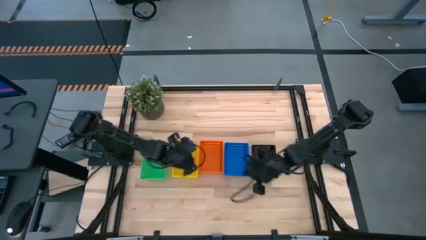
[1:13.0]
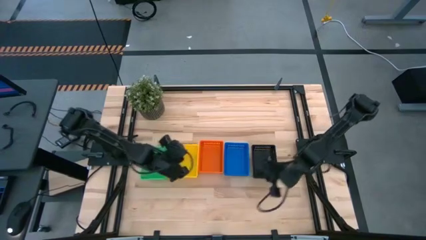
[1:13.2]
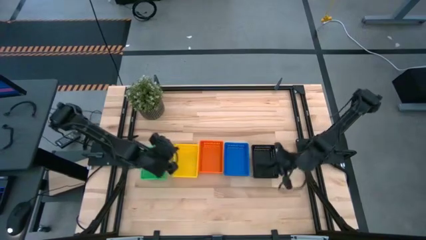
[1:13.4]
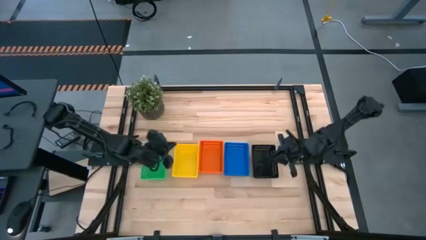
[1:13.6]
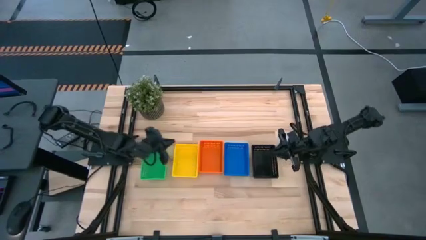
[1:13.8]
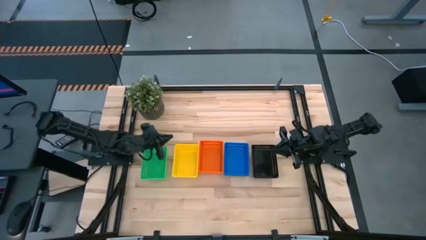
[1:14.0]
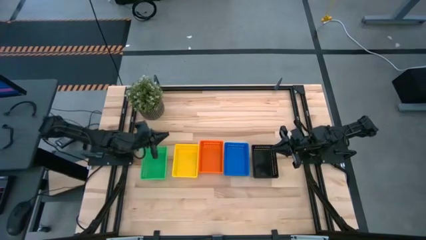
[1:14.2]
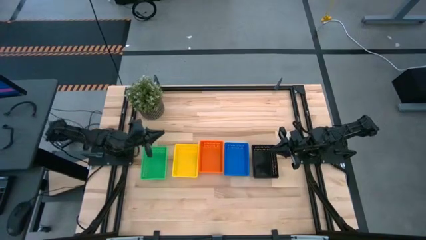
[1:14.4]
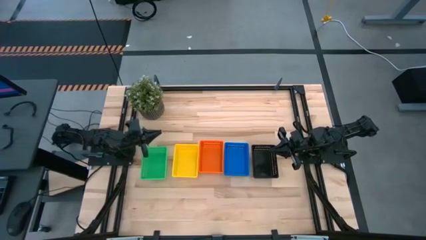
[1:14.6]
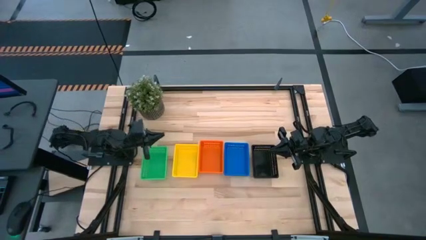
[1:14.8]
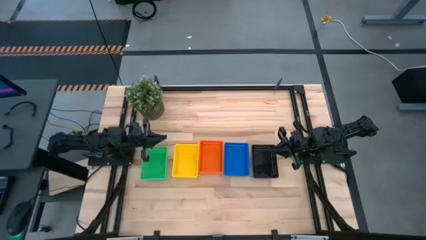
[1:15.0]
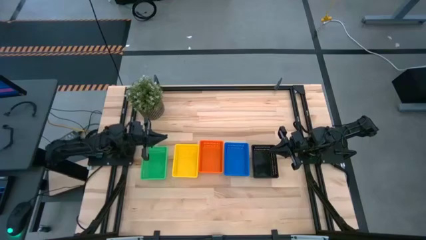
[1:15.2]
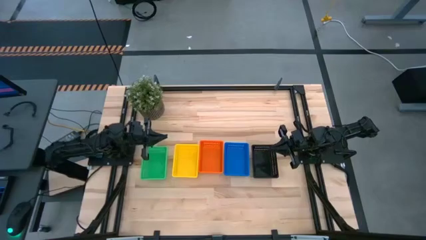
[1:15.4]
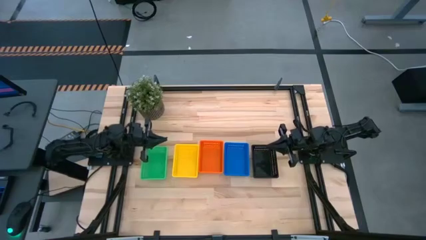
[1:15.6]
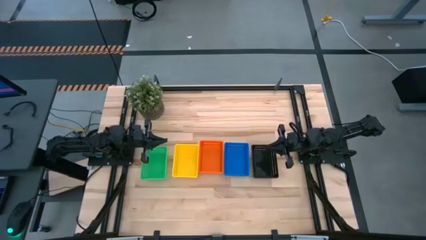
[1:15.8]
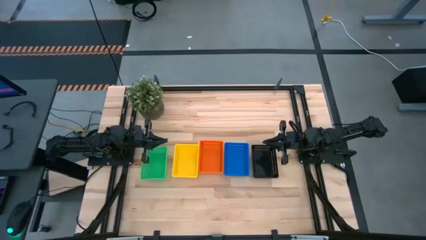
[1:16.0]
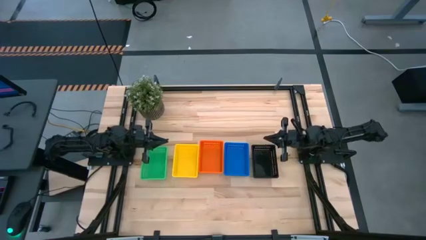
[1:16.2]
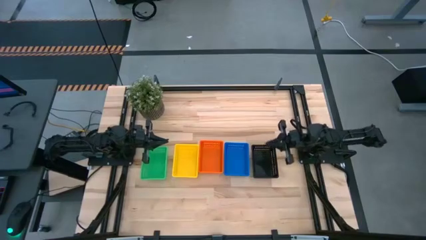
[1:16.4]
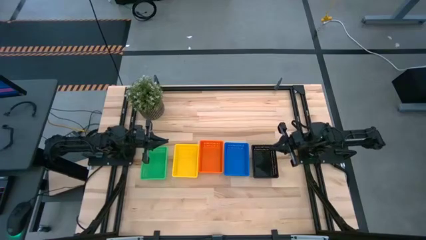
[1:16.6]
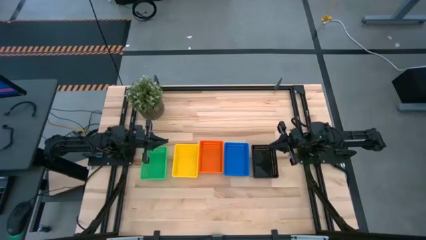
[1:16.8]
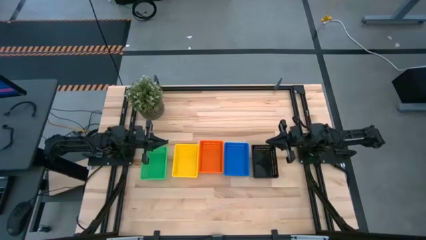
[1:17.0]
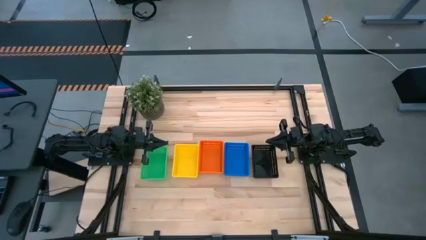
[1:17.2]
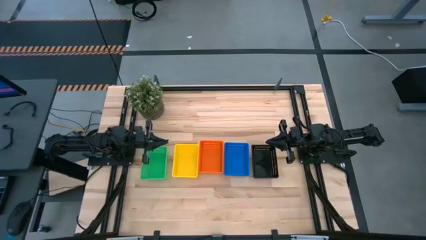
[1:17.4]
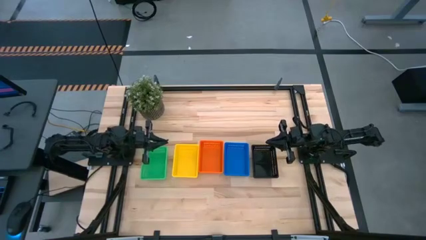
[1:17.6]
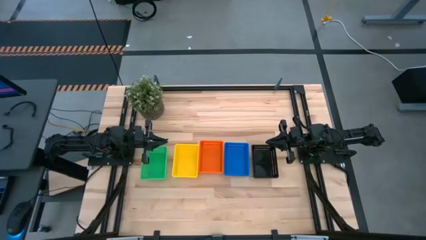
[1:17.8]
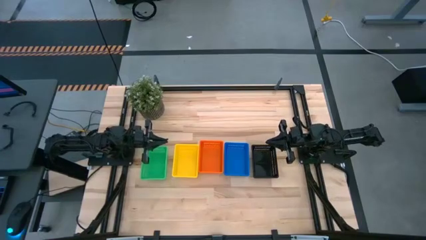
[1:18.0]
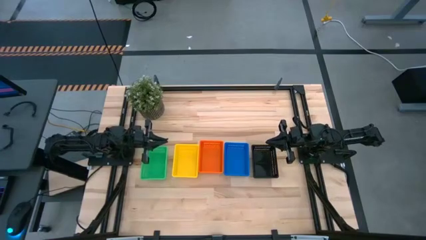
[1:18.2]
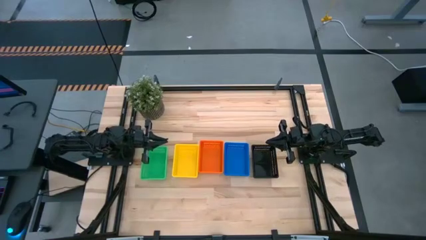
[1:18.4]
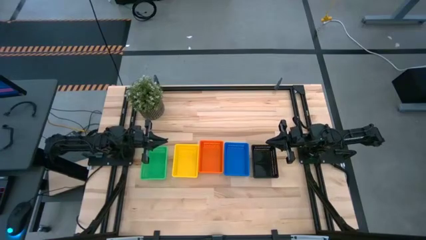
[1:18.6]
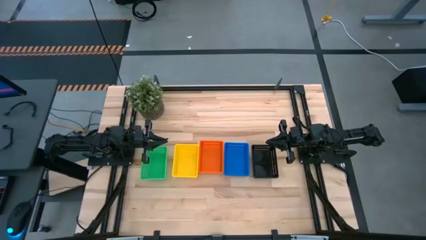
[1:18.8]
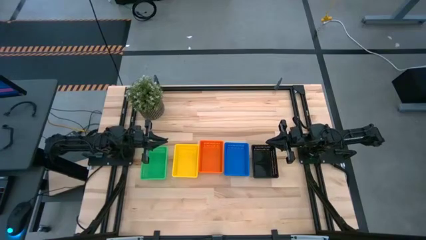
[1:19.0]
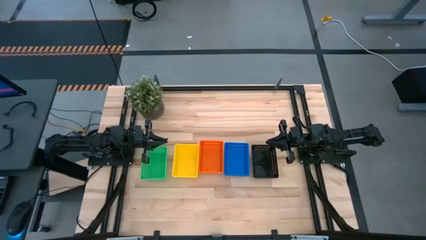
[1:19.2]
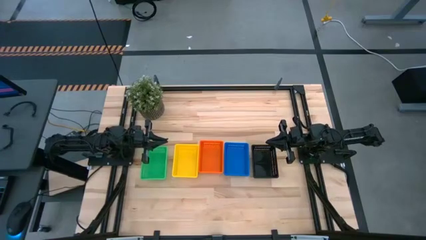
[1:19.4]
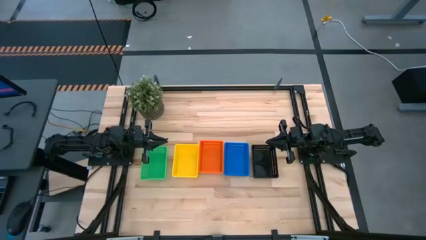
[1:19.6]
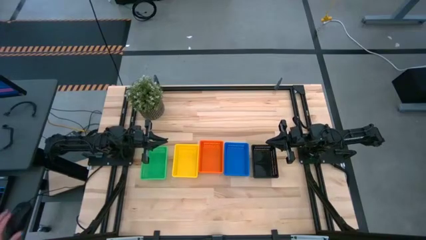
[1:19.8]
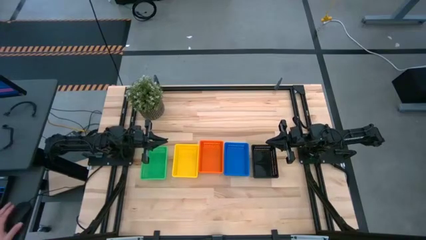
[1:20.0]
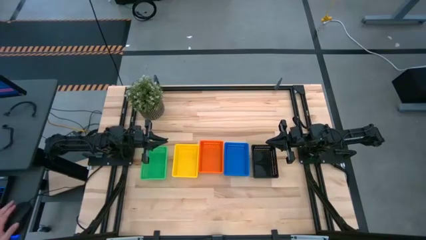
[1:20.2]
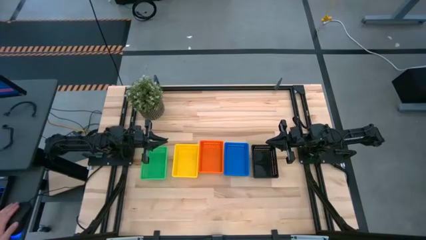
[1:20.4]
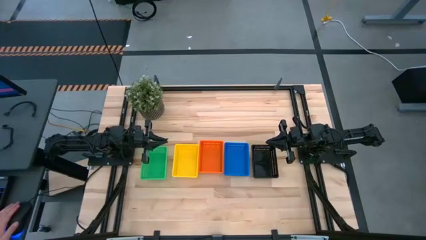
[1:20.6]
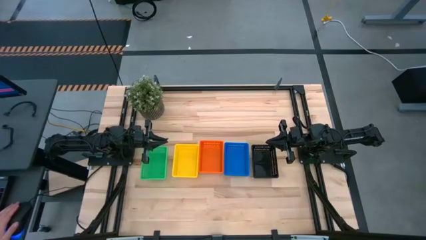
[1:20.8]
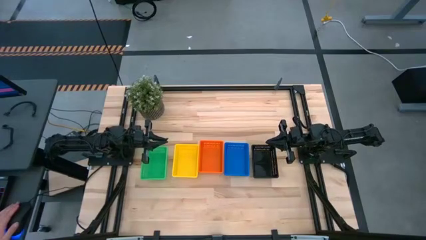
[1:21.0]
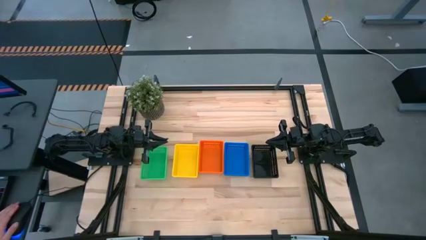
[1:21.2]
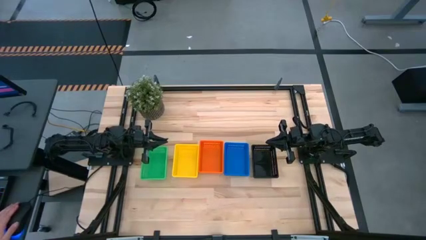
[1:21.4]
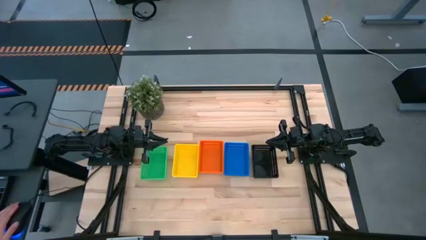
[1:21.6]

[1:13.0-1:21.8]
Return to Home Position

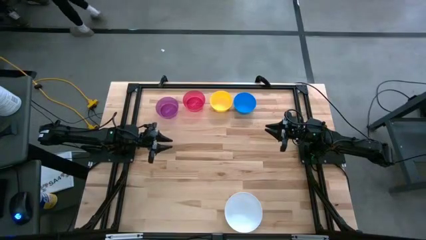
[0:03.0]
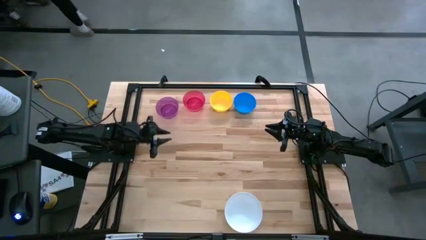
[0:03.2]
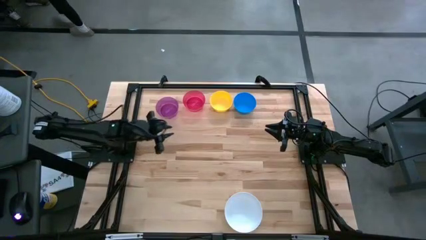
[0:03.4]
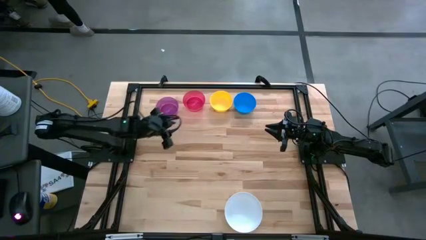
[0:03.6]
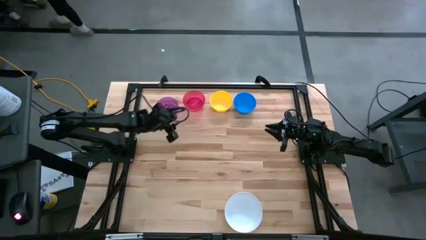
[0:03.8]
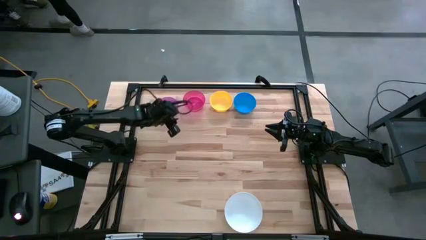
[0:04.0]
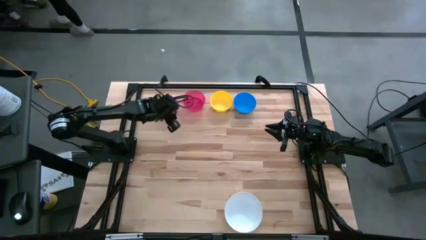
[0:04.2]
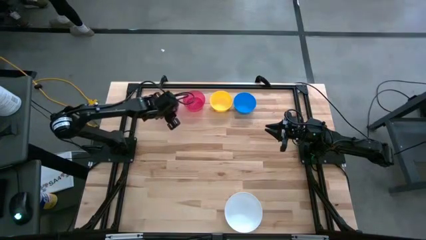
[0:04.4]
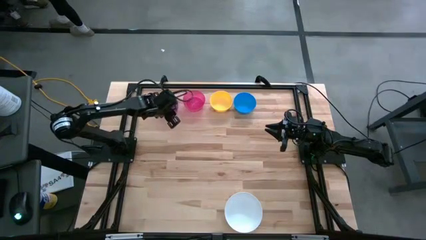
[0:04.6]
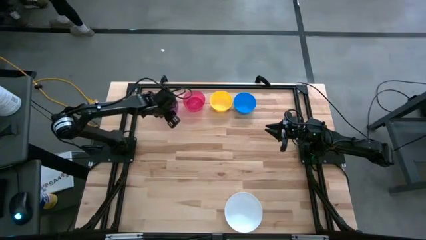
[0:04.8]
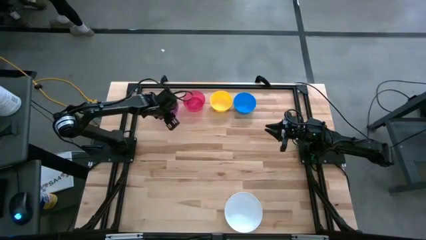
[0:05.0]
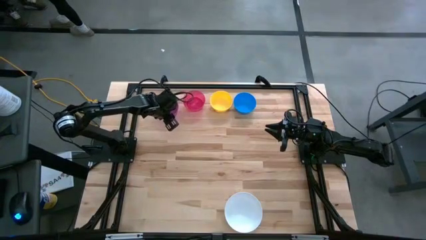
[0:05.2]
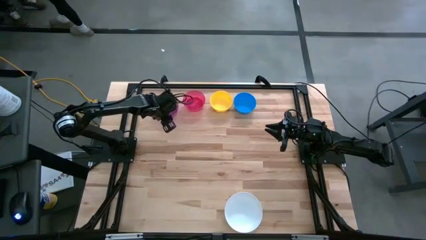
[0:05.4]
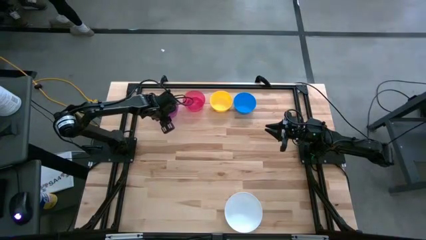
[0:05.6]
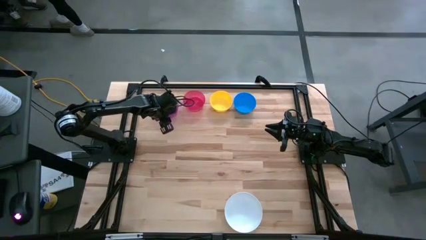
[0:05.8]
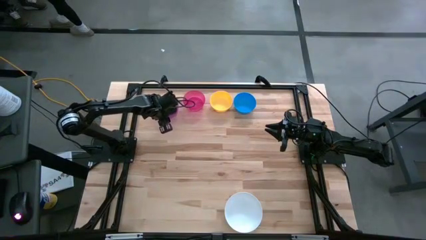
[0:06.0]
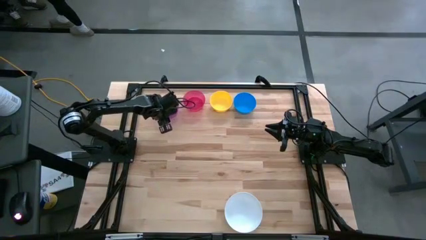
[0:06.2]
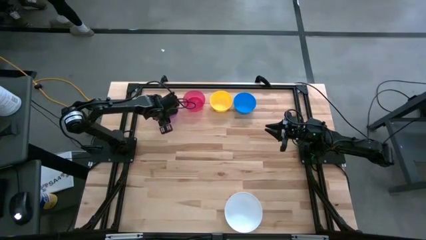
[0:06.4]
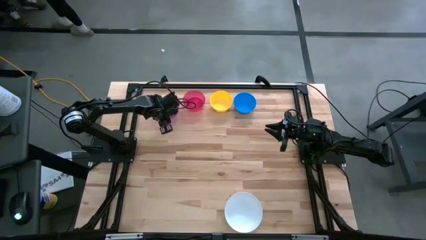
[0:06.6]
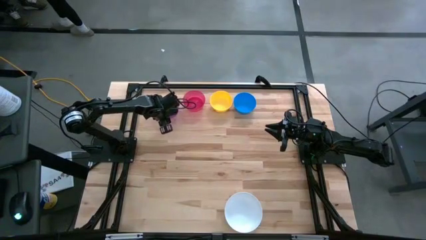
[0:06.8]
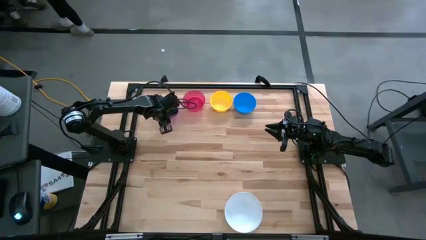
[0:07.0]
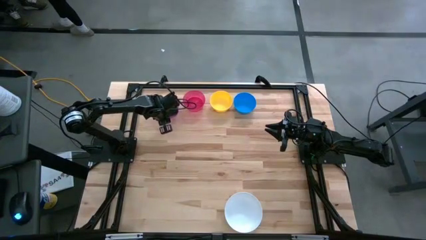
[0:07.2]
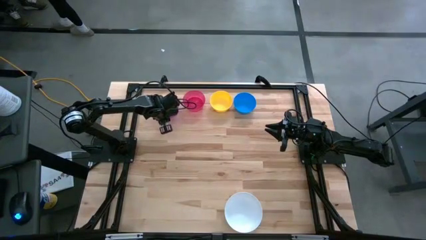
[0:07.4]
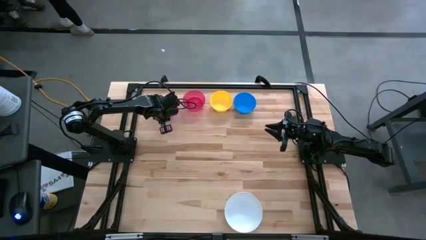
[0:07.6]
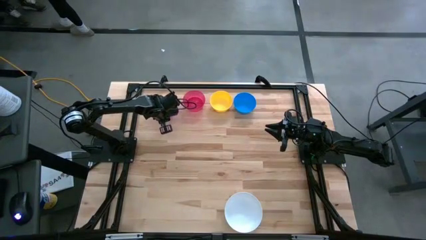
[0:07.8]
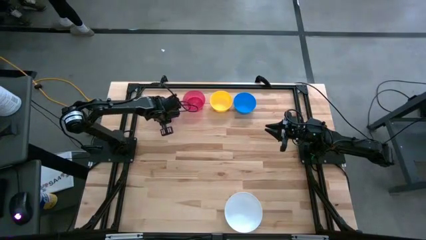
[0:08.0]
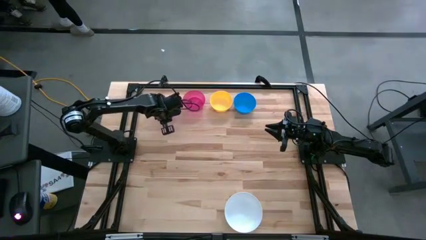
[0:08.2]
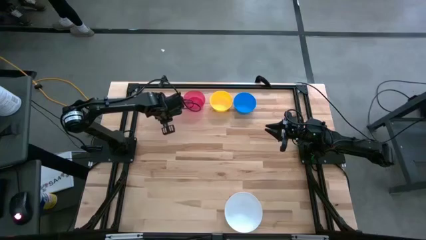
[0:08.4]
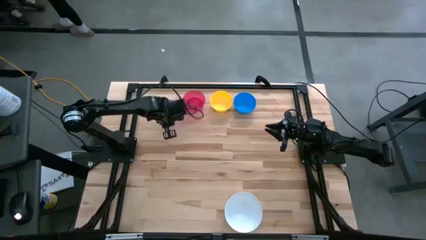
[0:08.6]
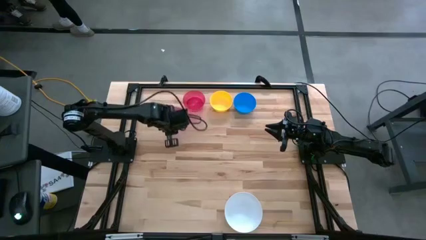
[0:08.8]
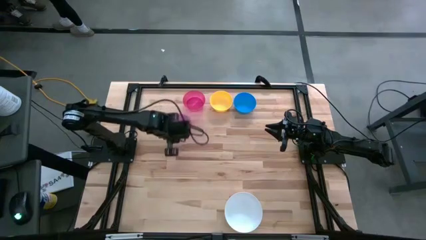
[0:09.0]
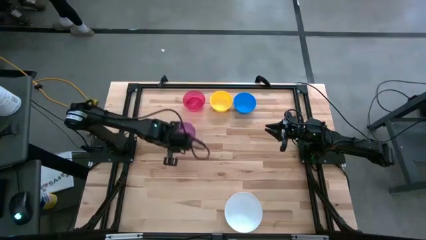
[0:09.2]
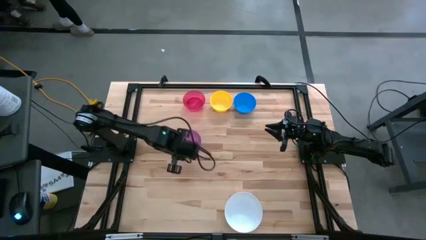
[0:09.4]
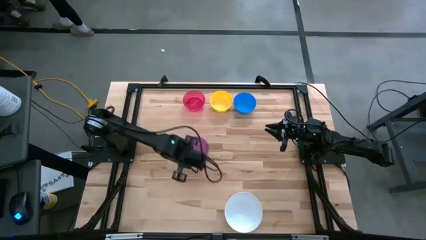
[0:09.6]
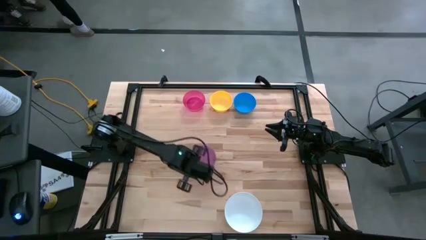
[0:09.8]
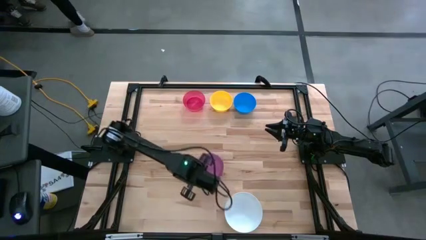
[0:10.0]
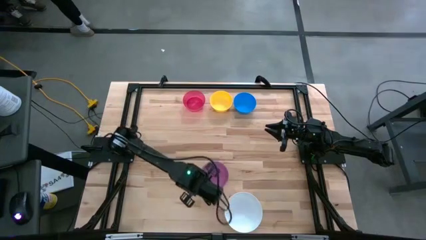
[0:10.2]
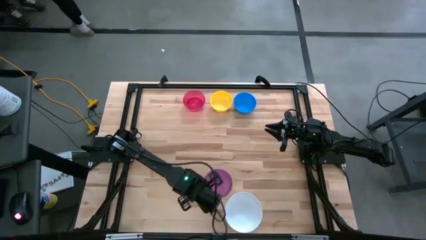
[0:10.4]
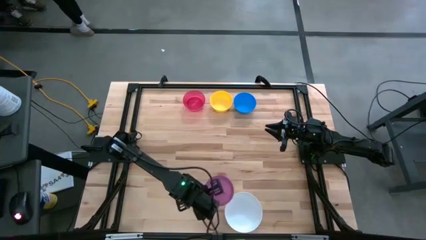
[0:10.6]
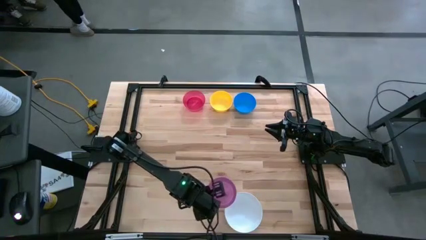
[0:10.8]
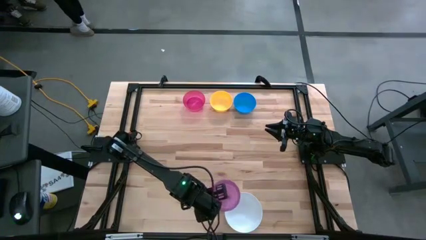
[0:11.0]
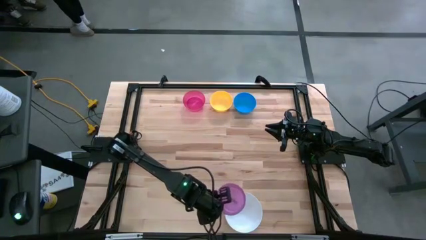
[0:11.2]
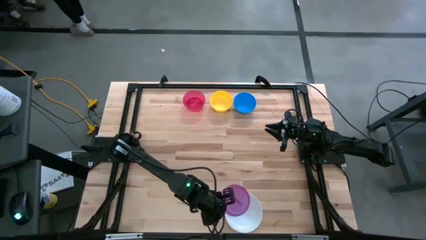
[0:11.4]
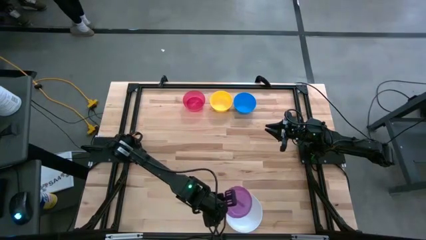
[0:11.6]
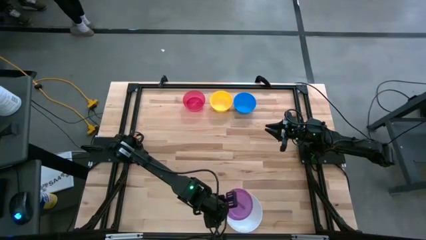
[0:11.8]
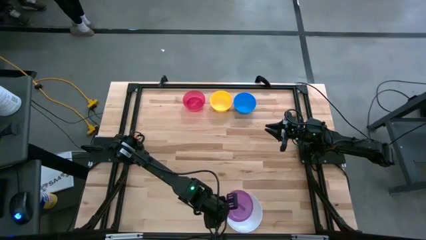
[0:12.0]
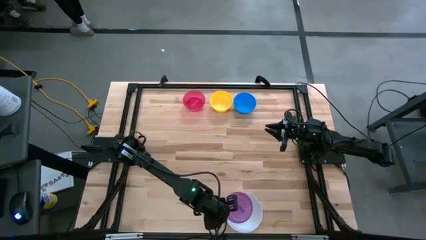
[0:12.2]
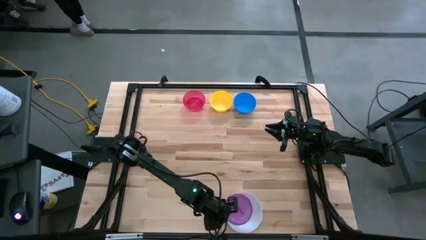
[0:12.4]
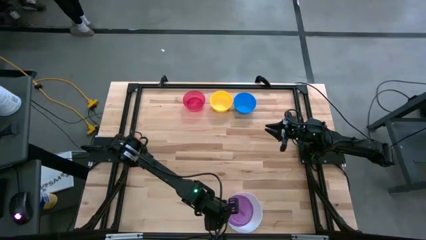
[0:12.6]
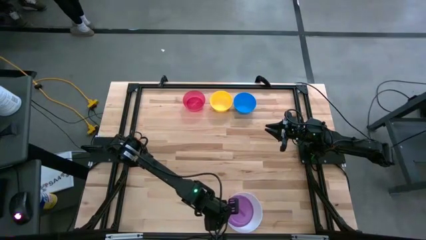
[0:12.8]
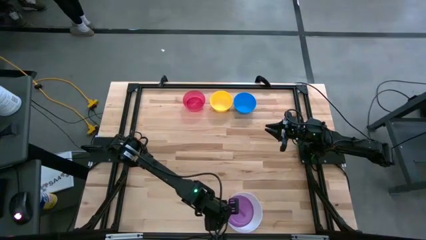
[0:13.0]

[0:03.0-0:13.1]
Stack the violet bowl on the white bowl
